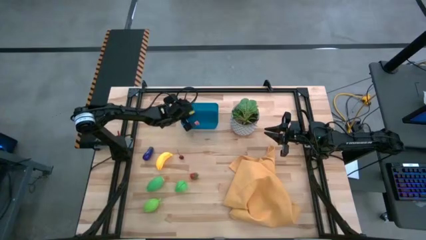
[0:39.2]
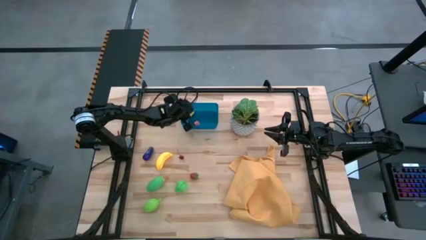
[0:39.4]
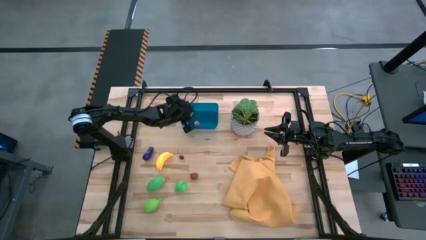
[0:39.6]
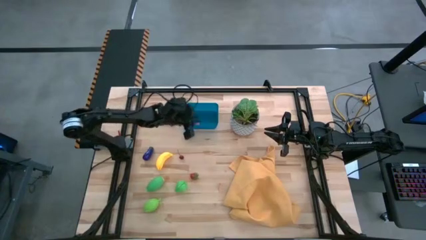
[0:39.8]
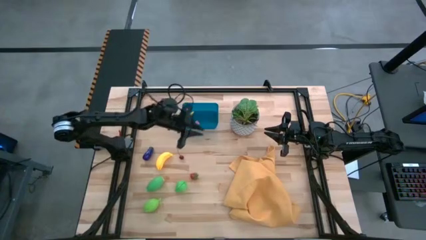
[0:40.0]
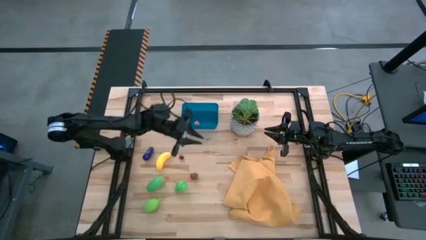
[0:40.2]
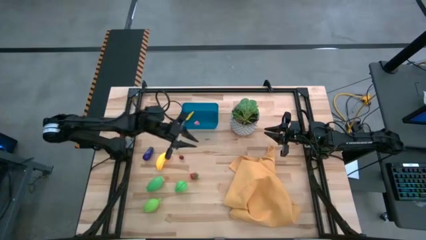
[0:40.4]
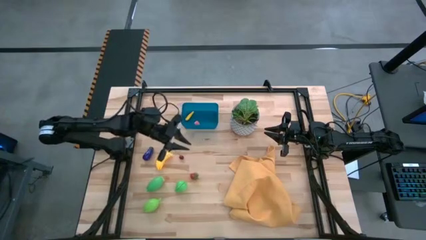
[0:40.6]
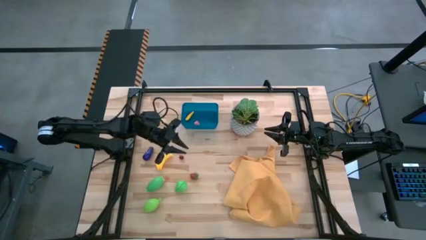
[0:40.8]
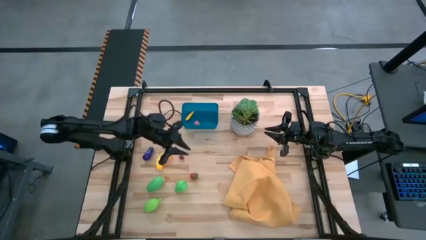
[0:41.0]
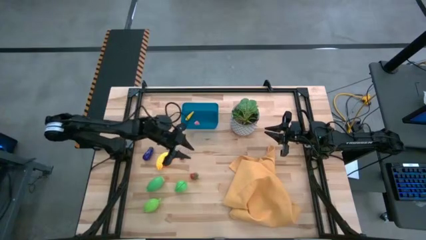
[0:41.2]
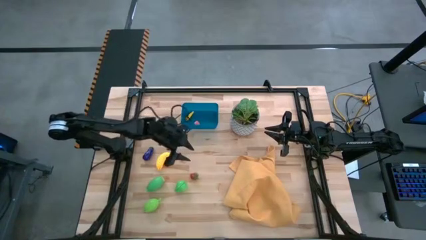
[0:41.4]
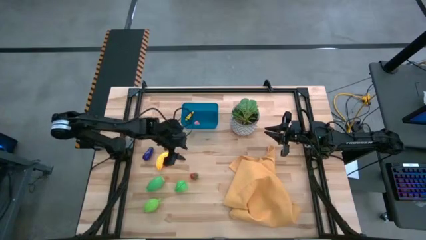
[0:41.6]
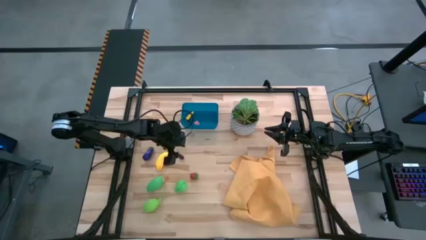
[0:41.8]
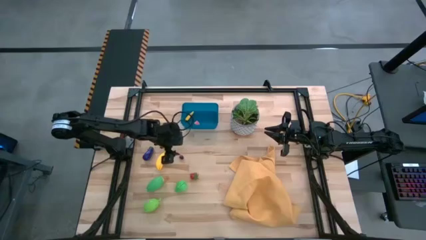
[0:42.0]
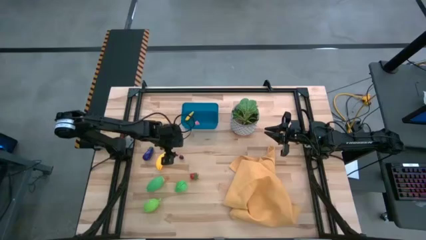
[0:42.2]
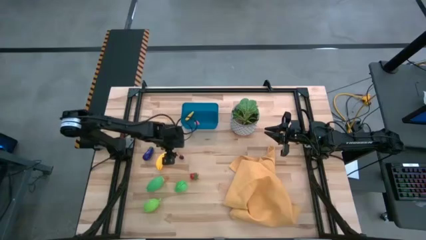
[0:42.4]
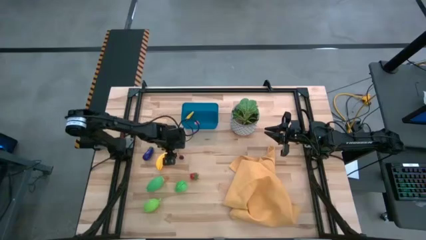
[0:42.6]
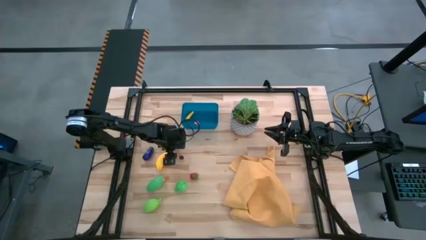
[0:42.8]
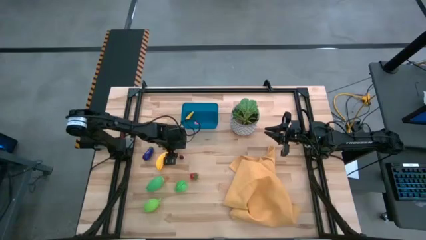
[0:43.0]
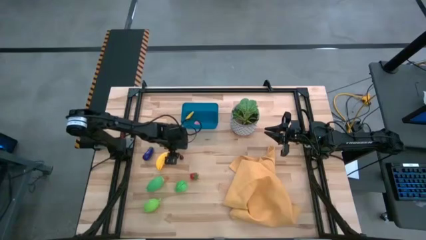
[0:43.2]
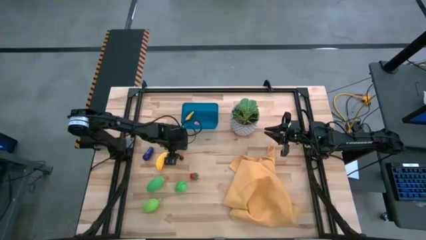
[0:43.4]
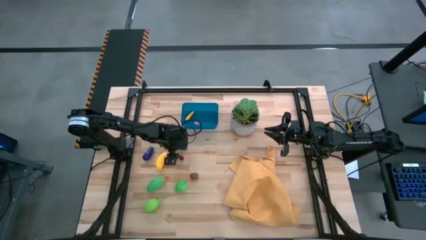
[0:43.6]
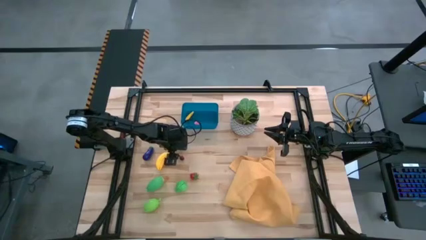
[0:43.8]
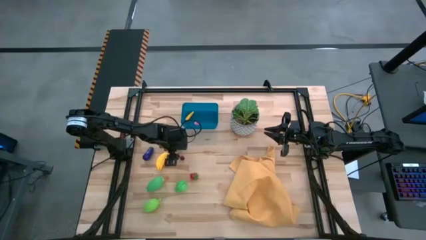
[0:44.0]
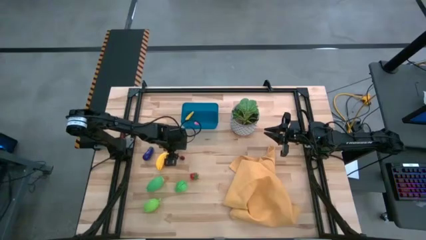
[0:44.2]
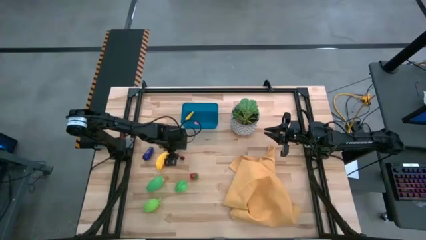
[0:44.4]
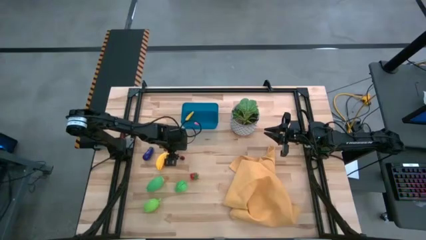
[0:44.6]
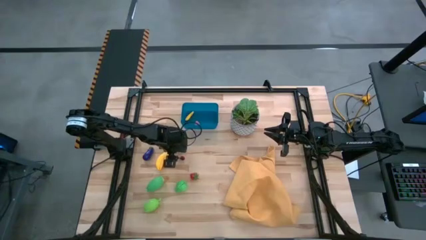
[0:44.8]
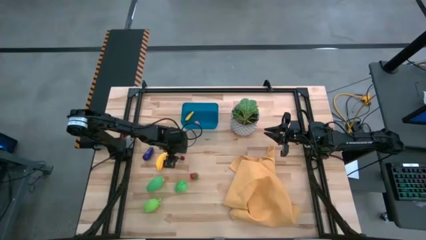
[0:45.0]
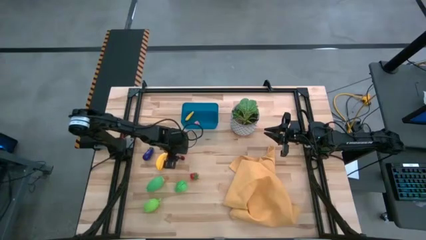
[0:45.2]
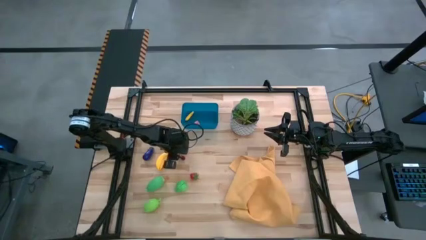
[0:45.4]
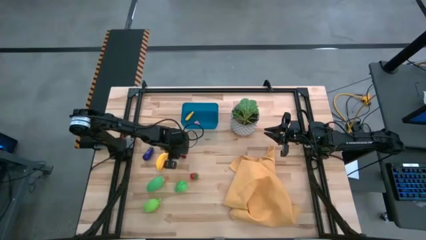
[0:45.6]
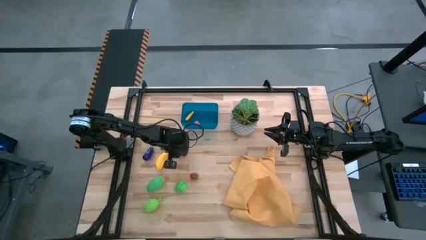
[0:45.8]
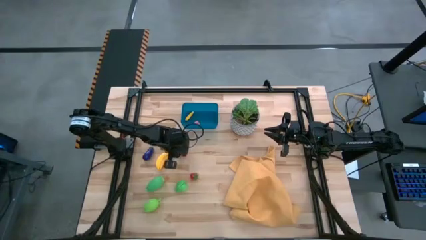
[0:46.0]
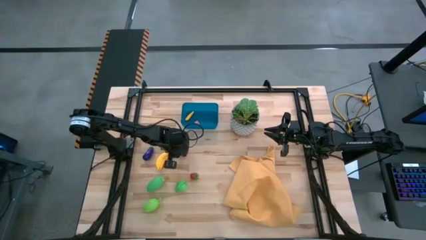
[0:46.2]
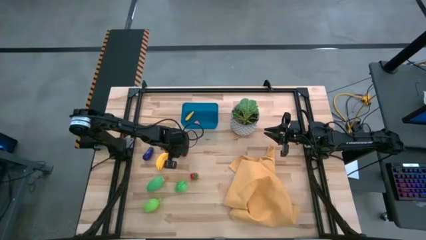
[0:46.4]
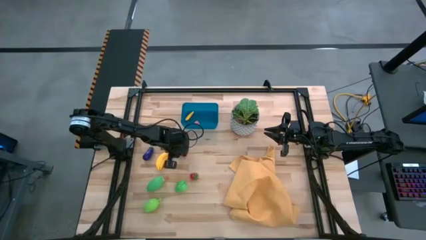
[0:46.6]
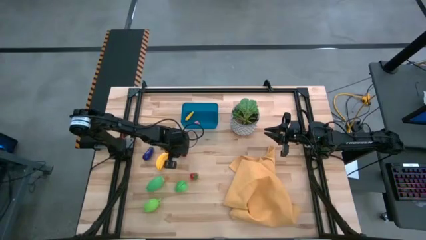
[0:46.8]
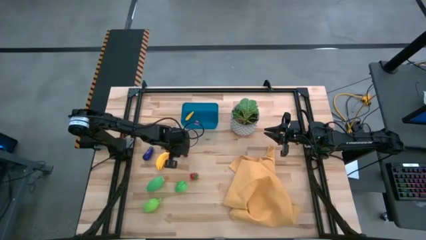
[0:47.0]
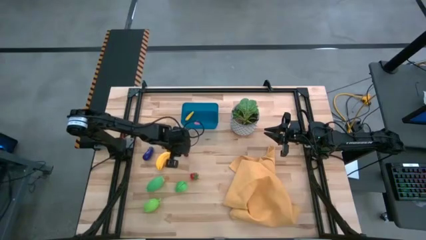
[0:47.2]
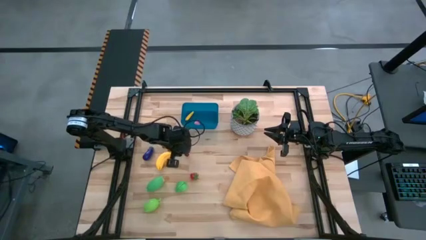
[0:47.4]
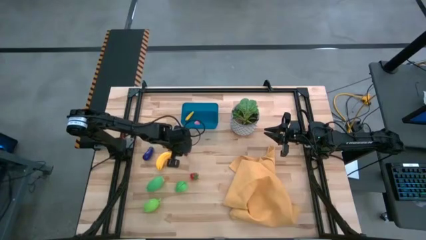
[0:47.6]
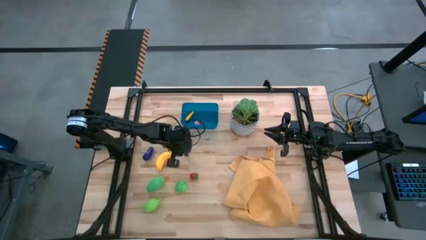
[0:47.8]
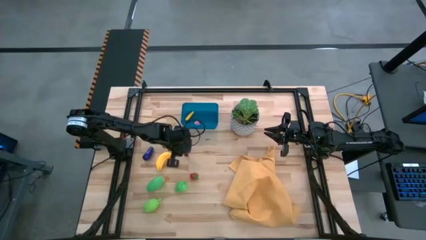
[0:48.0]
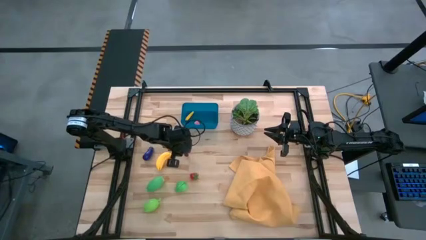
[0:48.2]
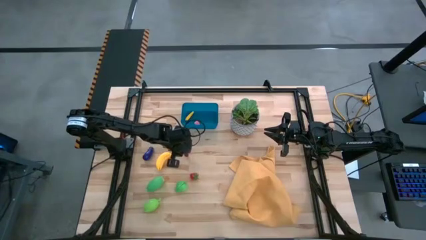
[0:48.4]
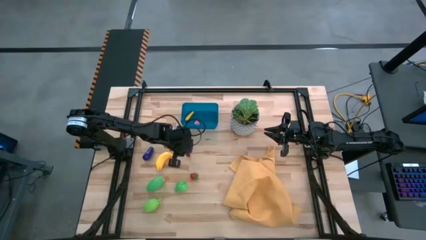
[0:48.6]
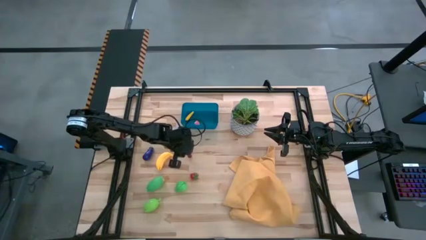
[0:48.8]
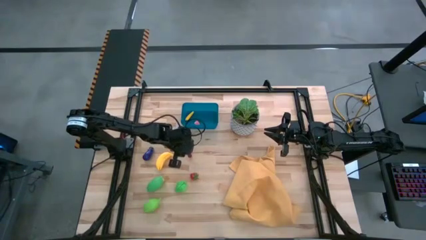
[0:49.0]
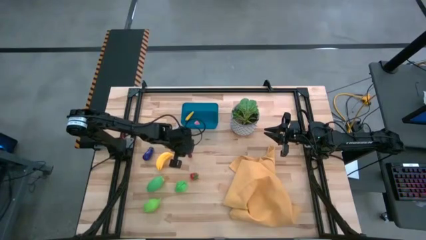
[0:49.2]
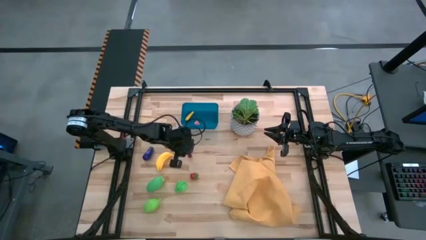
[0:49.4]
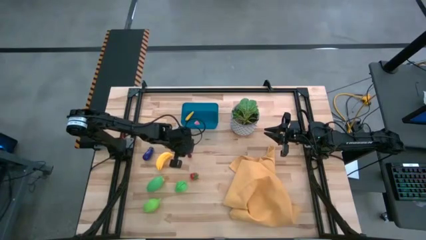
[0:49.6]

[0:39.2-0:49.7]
Task: Pick and placing Produce into tupperware
Put the red cherry into the blue bin

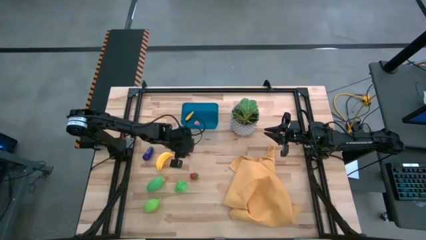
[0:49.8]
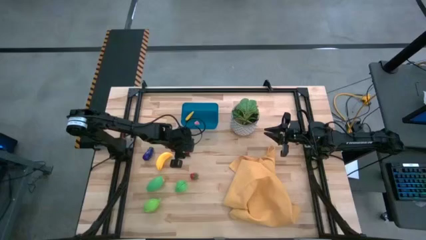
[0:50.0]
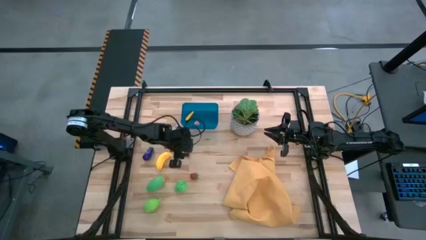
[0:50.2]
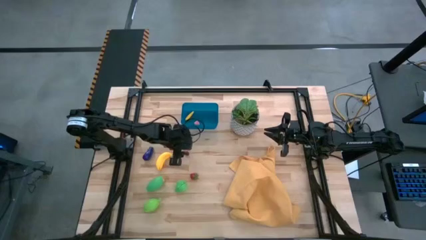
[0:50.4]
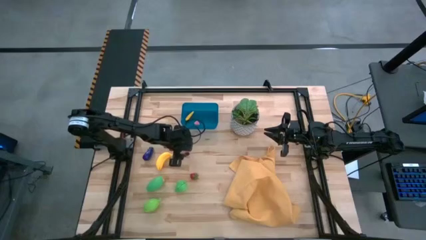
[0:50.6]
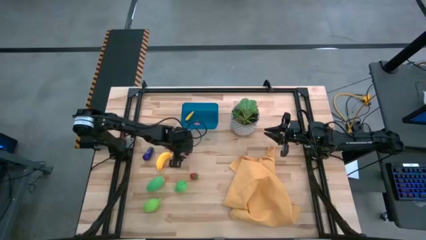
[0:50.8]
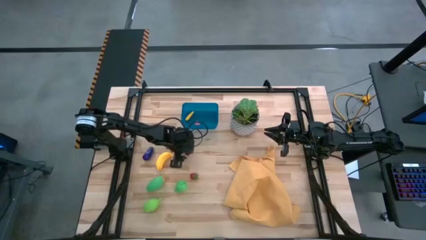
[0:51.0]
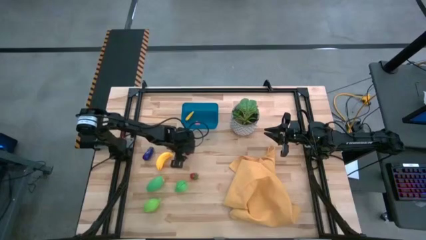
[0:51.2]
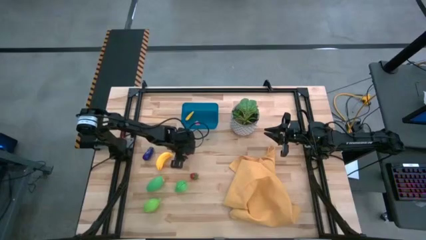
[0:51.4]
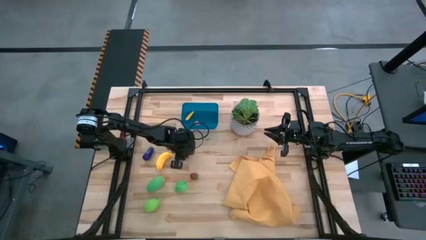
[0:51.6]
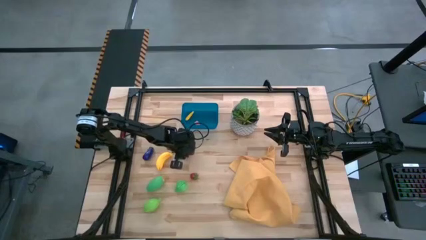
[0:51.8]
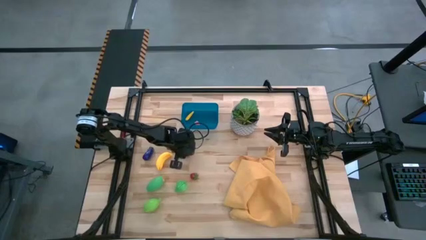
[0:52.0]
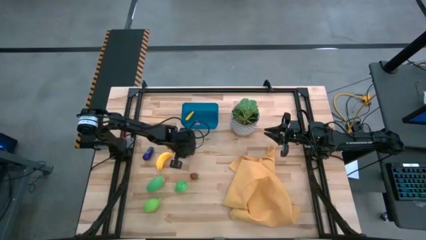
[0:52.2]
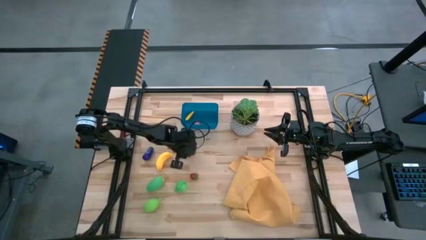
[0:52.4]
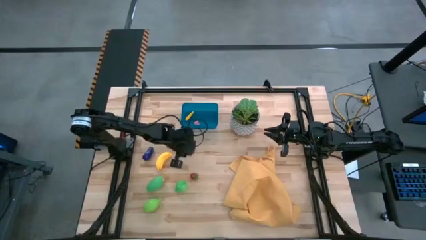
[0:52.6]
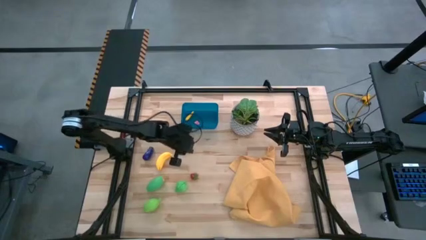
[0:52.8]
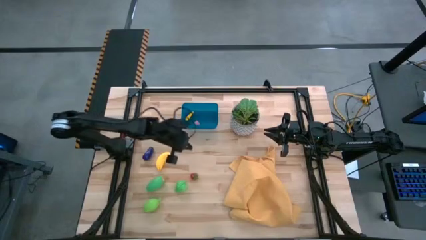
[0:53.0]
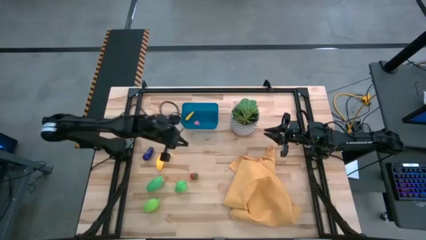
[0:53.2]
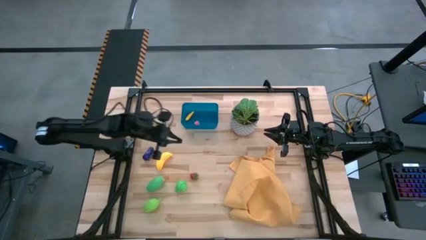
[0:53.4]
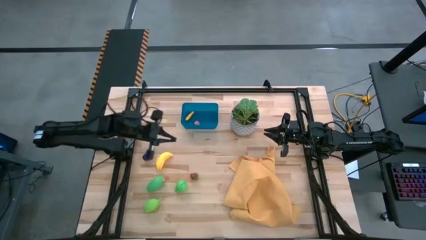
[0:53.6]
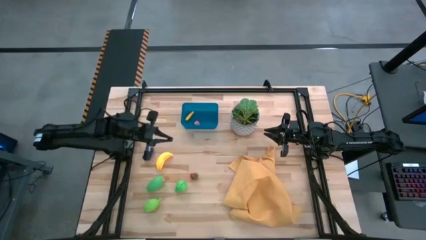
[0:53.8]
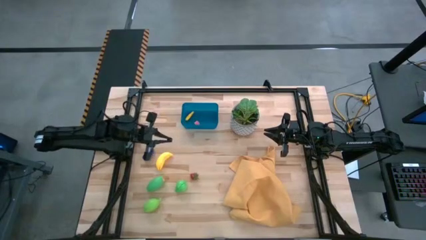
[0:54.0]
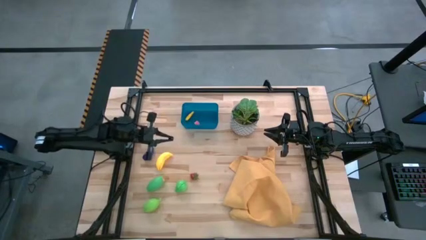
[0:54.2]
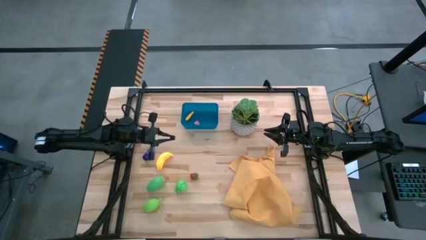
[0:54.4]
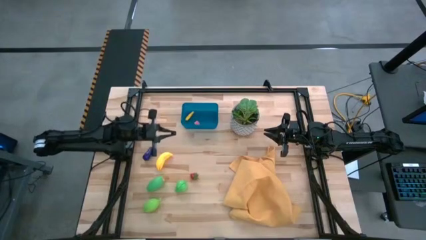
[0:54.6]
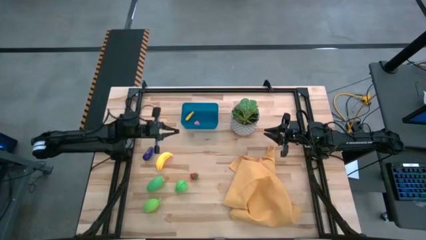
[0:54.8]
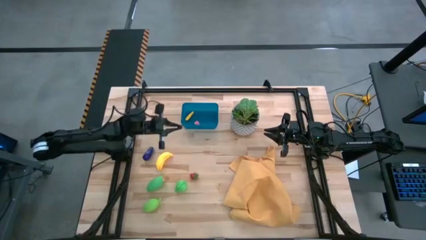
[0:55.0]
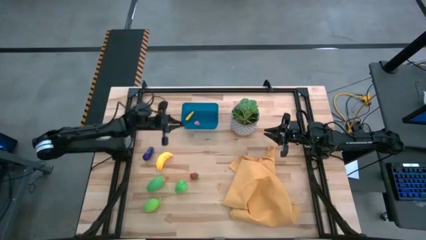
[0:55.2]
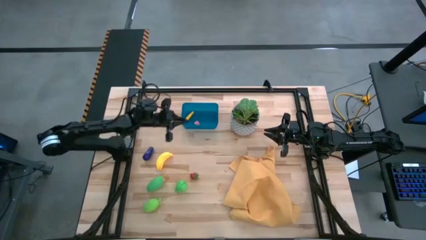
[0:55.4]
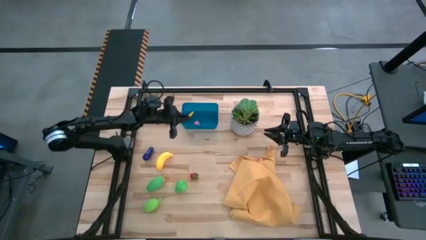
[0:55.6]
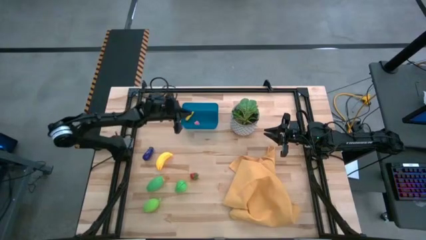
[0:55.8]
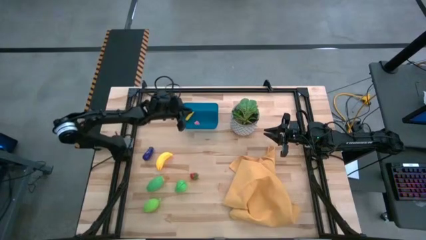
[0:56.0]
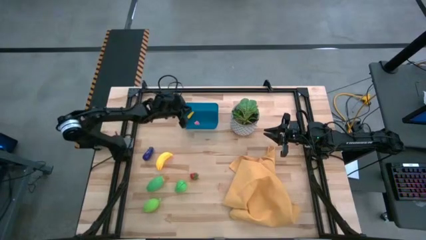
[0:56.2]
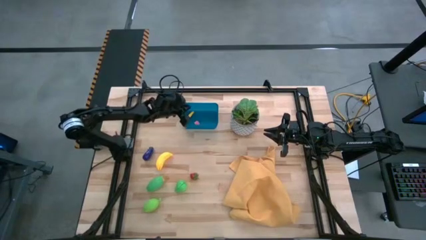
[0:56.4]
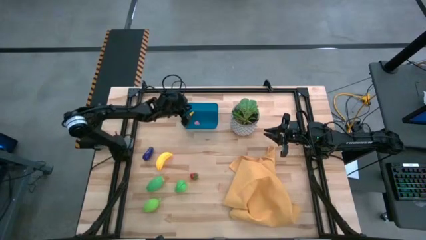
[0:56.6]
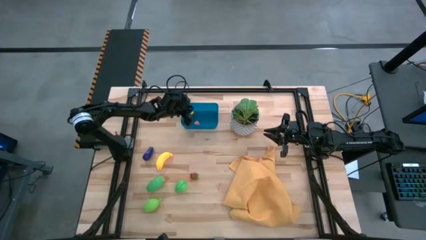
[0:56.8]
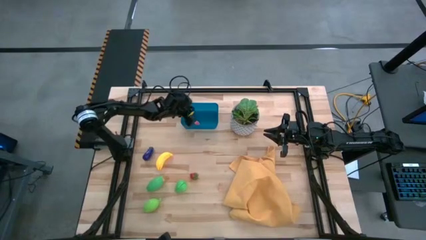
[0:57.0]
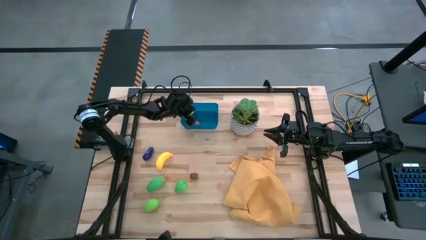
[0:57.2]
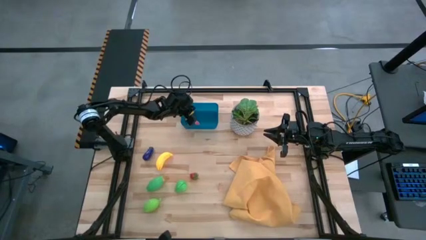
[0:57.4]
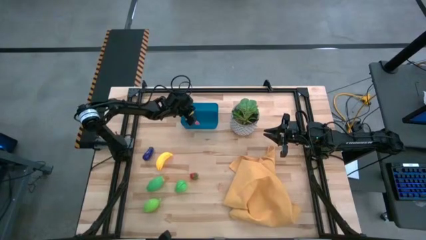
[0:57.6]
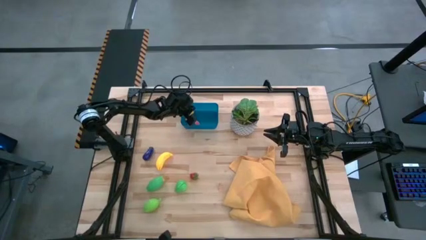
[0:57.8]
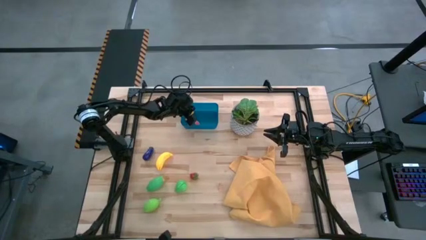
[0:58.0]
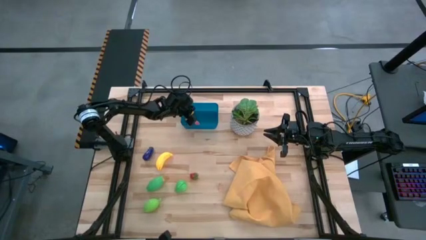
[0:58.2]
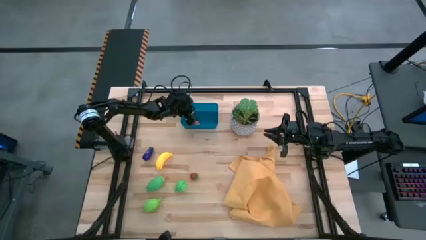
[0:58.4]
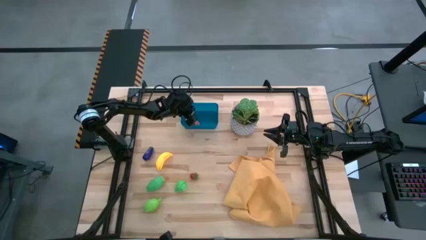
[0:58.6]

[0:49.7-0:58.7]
Put the red cherry into the blue bin
